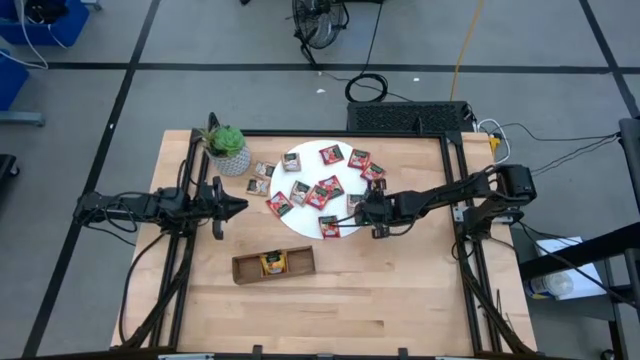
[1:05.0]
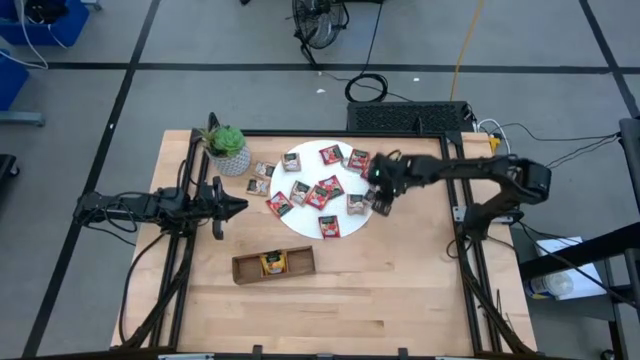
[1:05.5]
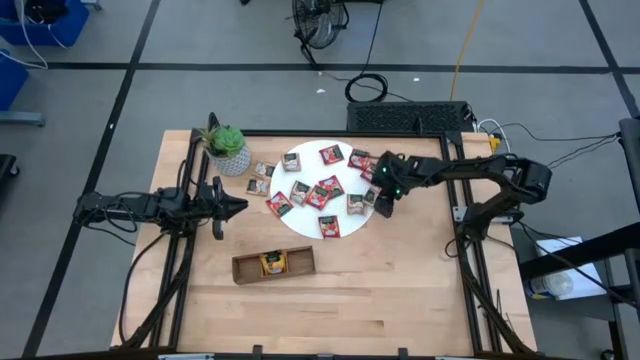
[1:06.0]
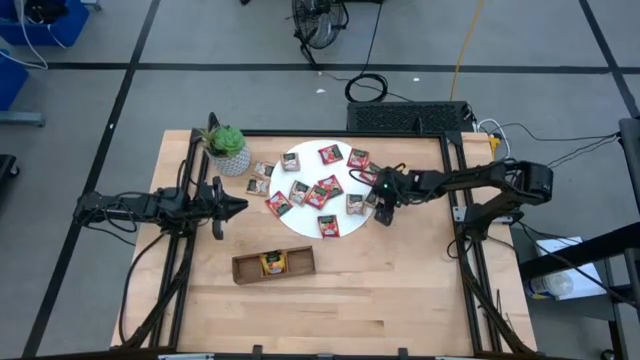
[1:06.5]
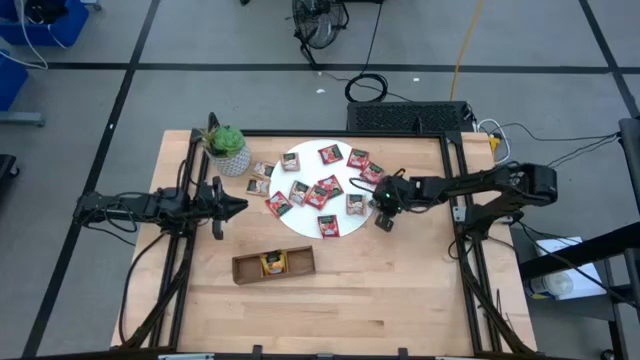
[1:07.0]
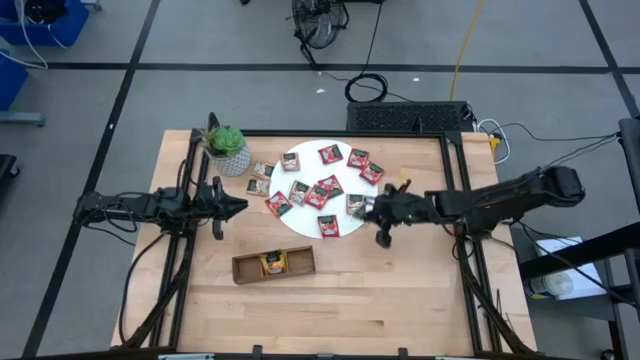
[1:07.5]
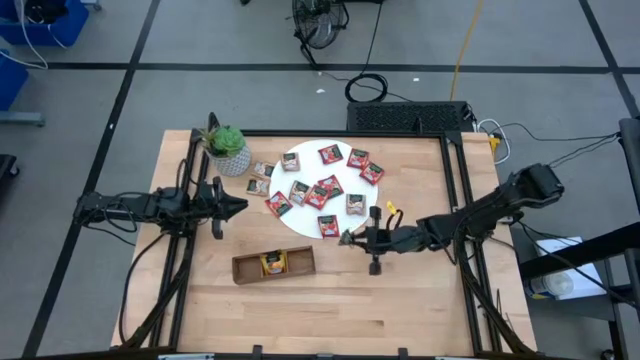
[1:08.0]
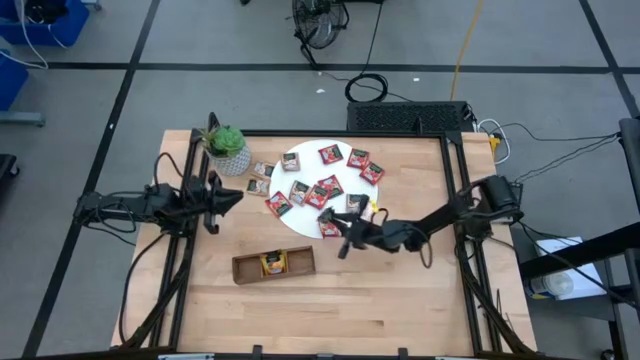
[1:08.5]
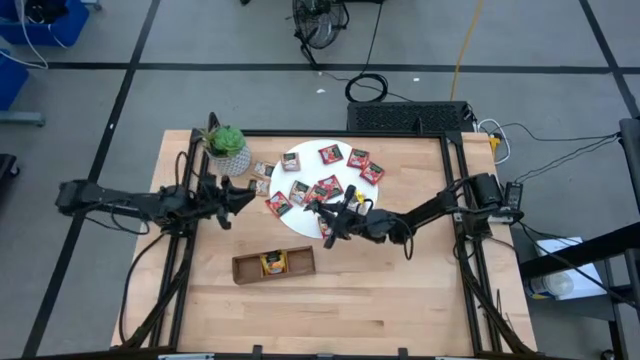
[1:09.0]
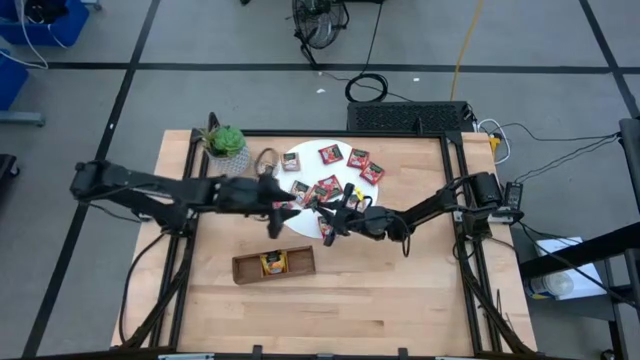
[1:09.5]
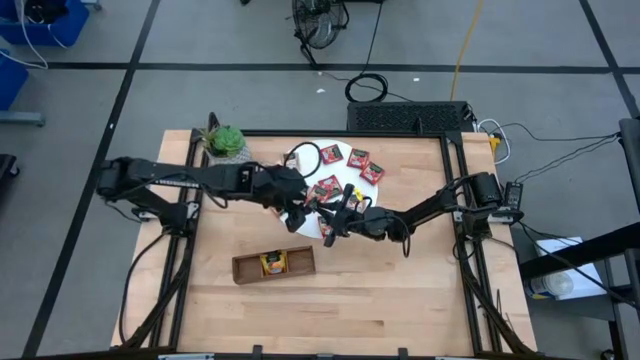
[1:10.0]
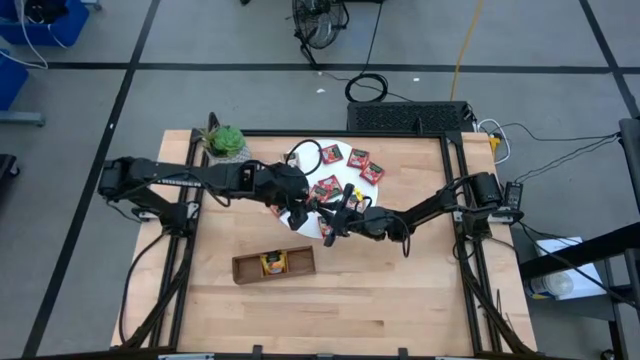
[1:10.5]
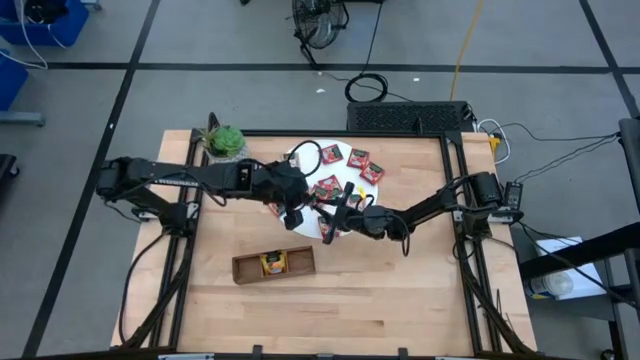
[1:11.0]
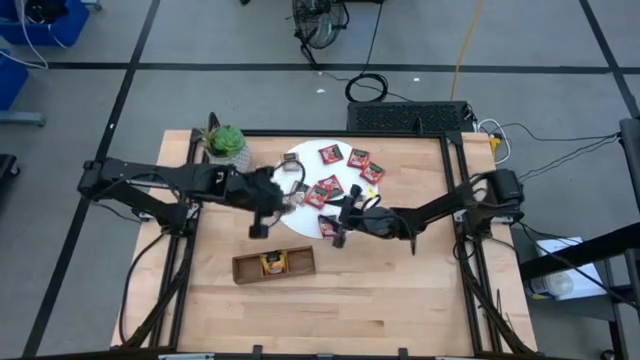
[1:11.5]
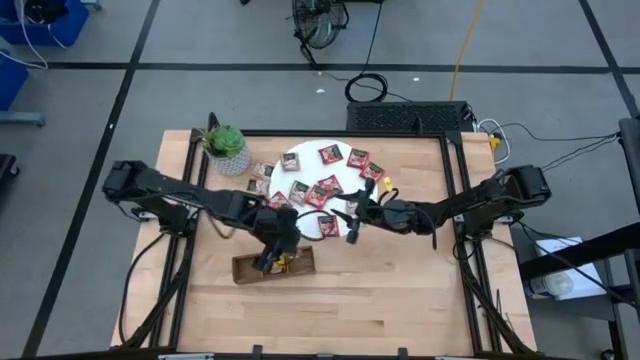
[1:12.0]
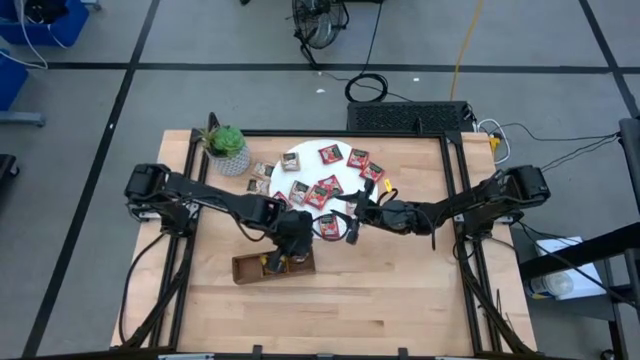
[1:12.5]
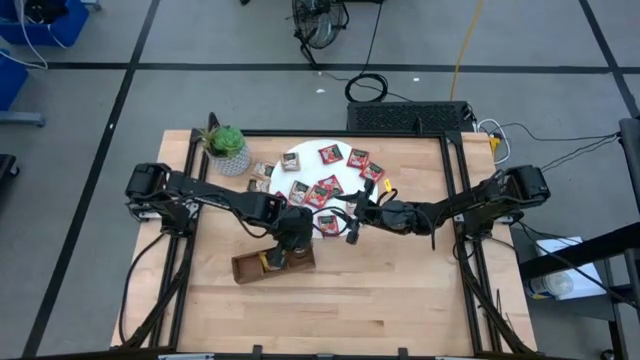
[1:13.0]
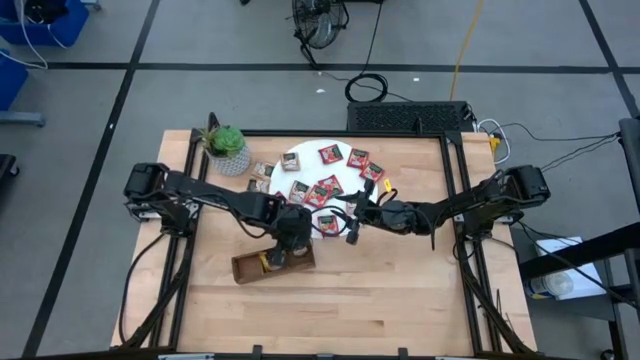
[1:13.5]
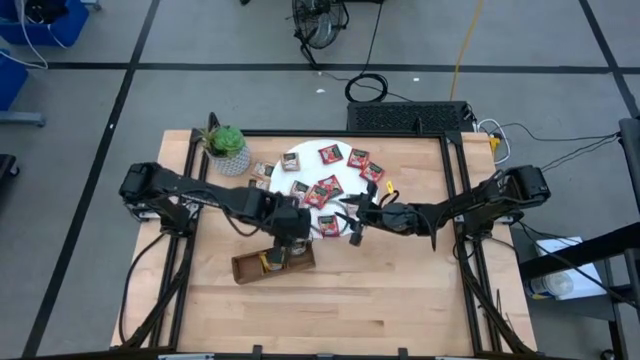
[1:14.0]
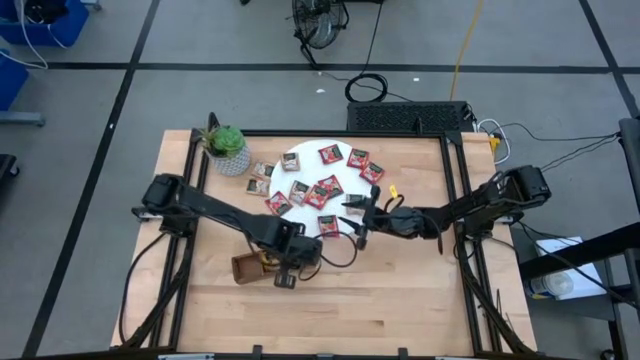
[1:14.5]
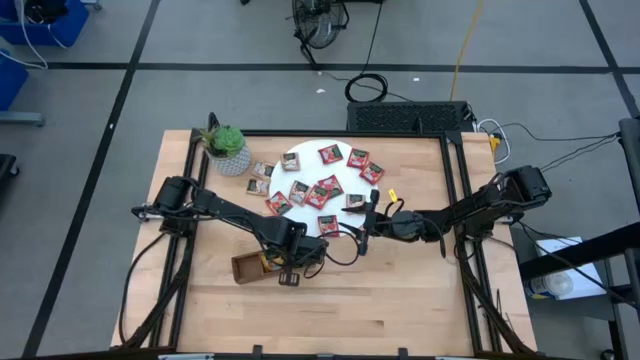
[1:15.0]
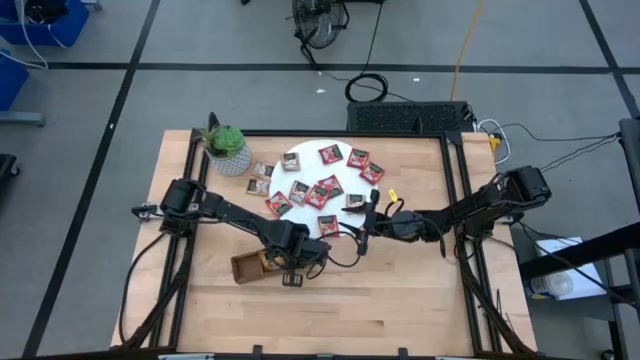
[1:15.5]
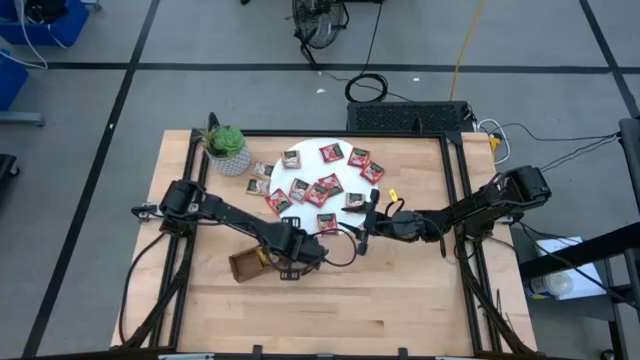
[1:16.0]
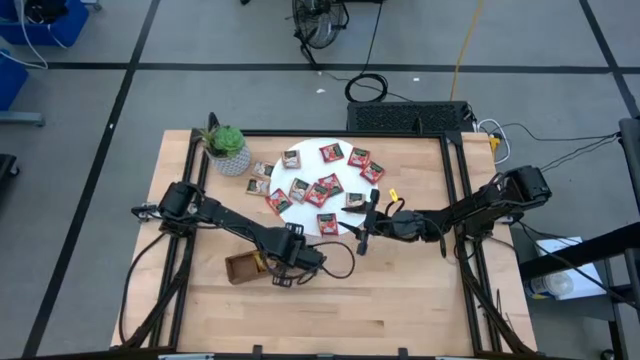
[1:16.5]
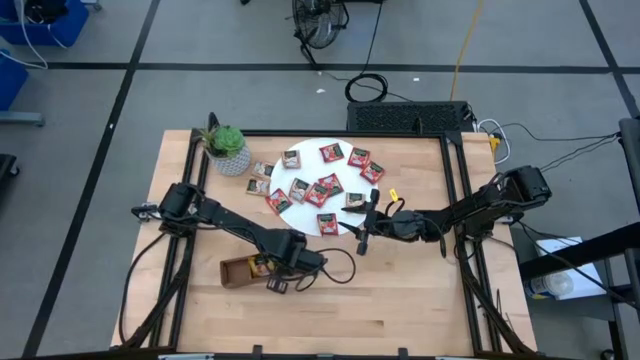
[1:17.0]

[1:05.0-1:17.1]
Task: Pick & Place Tea
Put the brown tea bag into the right section of the wooden organizer

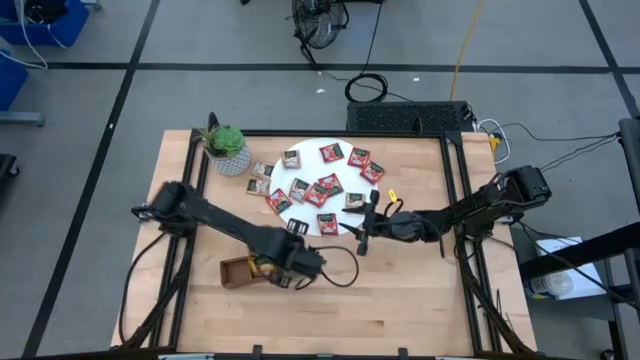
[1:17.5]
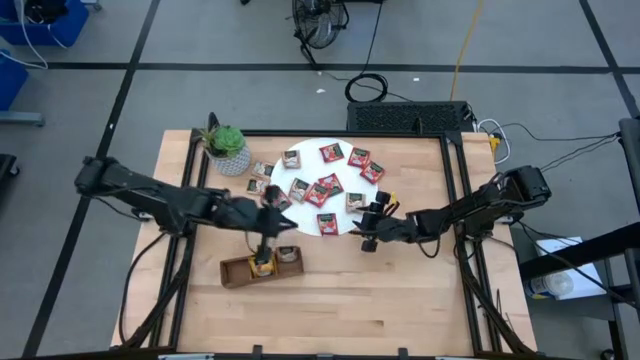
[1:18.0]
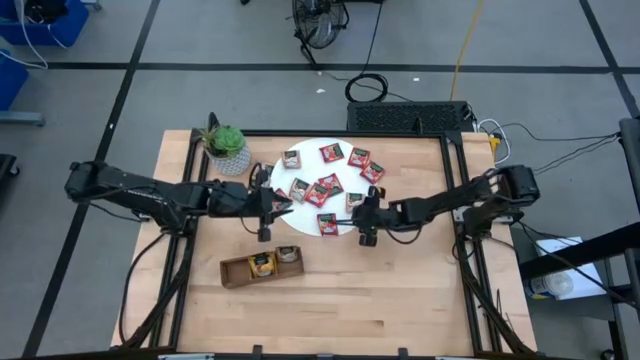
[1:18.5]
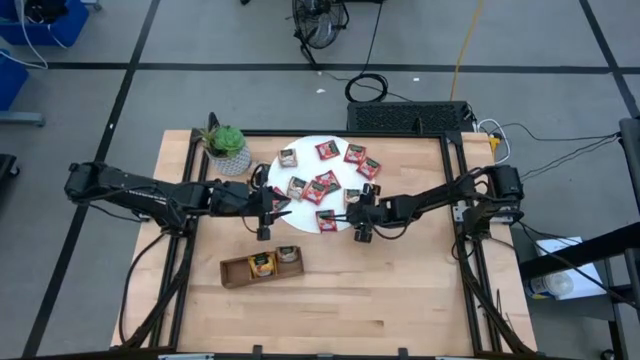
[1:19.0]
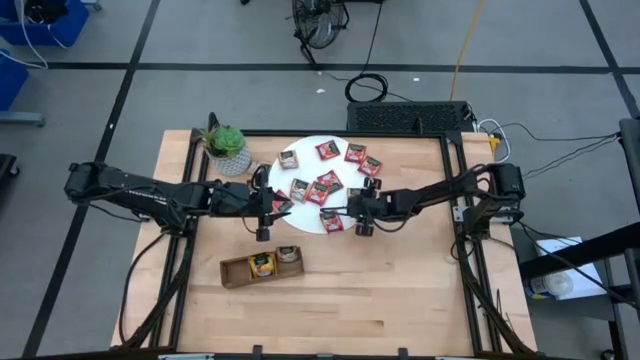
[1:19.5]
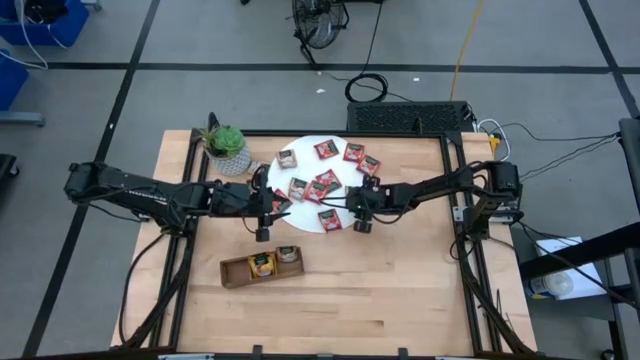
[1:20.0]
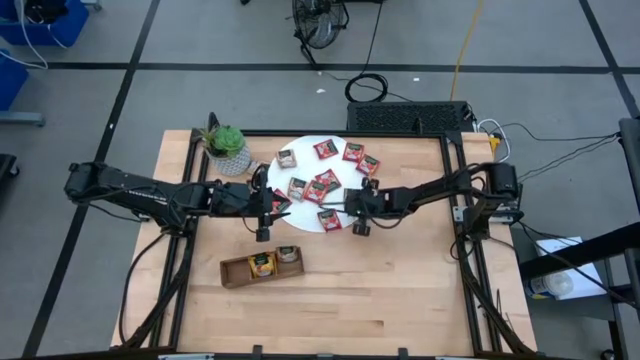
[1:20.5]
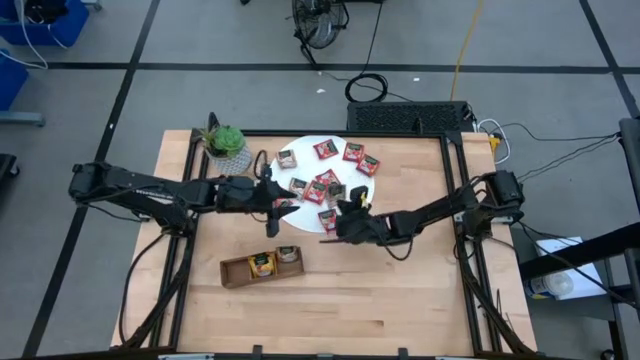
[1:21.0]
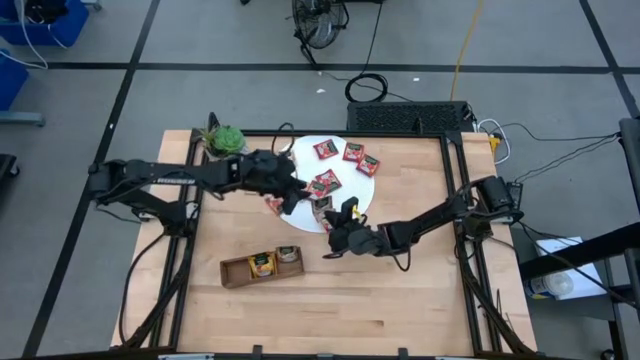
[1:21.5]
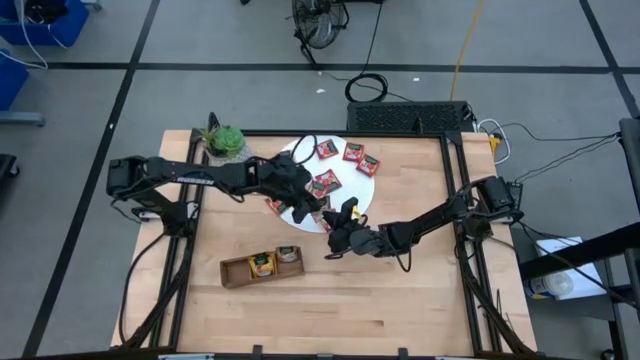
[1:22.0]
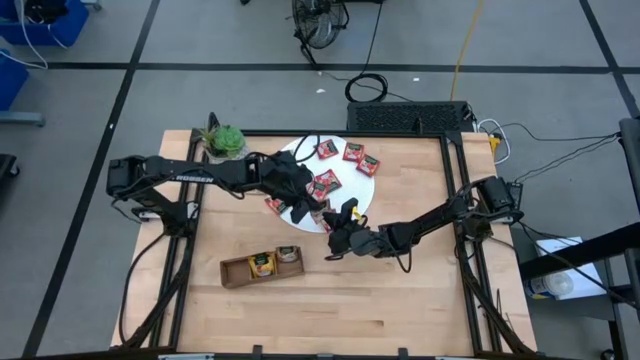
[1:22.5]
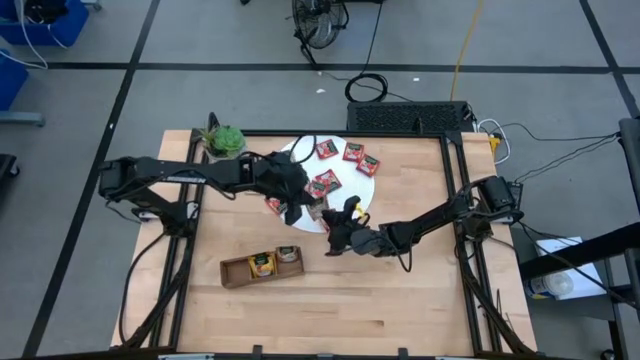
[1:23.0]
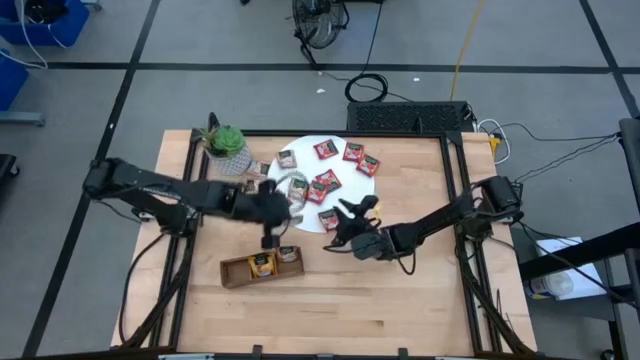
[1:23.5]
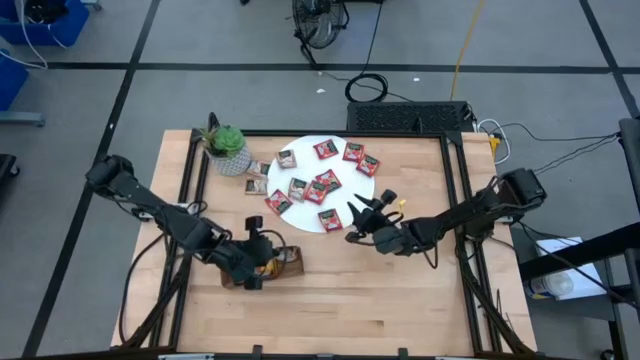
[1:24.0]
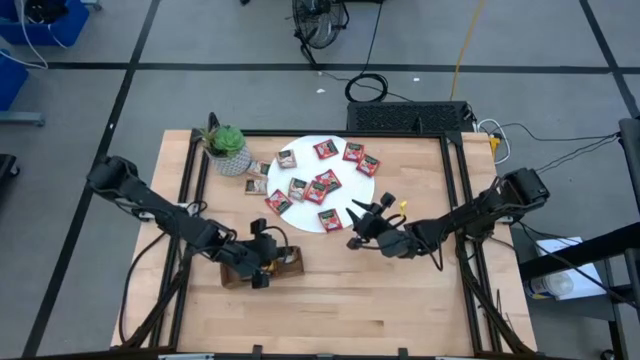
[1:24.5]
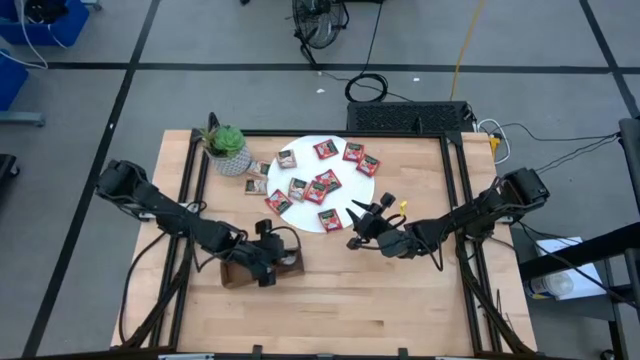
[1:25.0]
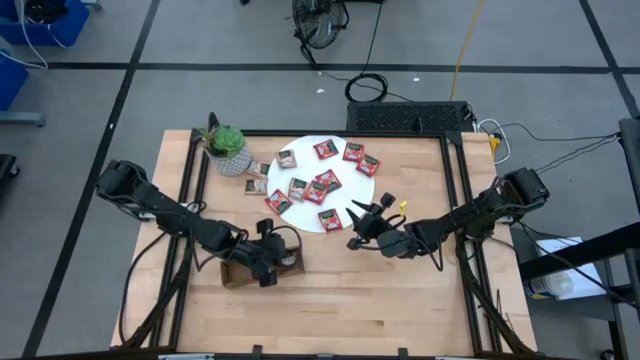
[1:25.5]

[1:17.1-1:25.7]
Put the brown tea bag into the right section of the wooden organizer
